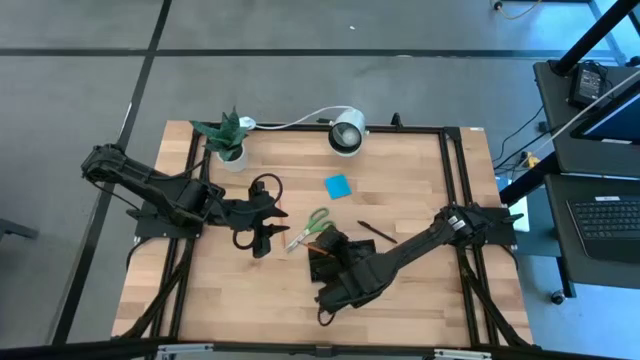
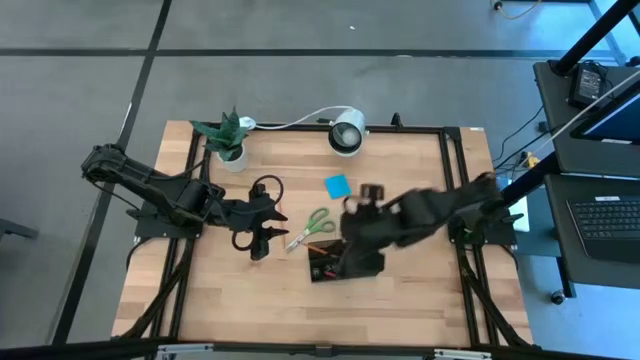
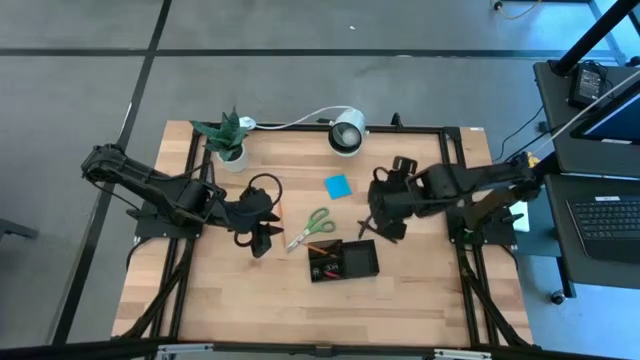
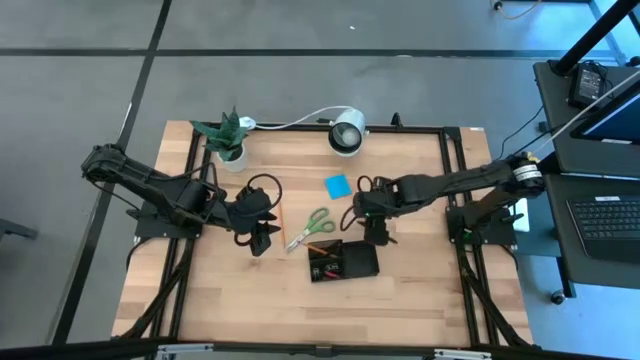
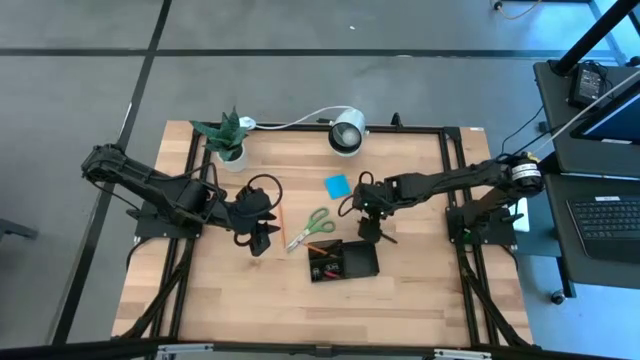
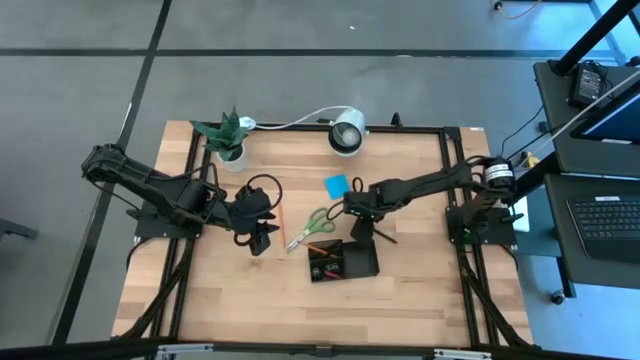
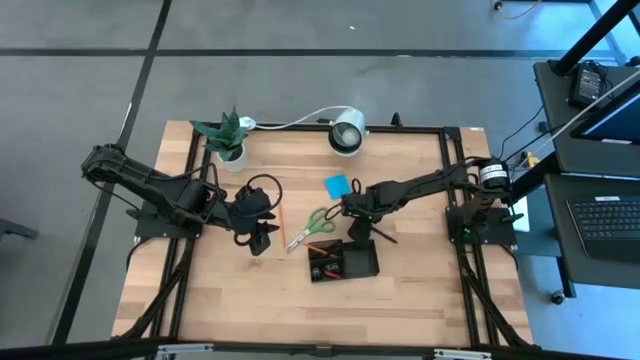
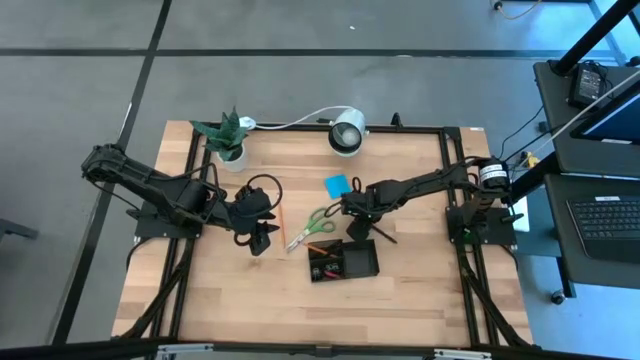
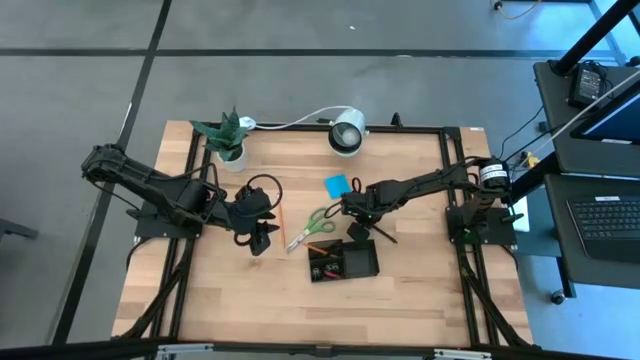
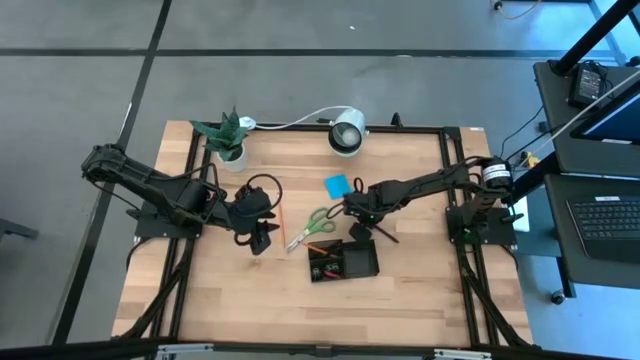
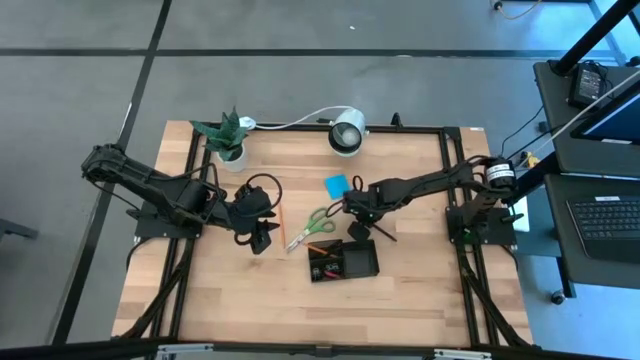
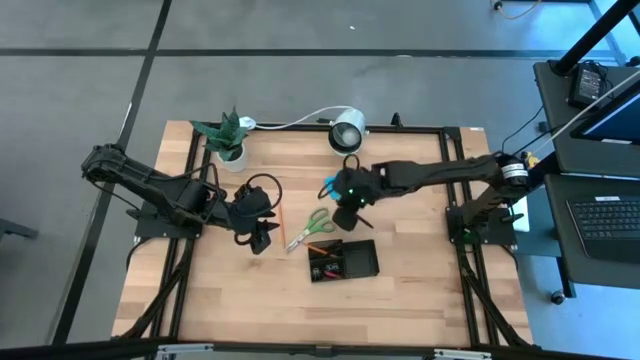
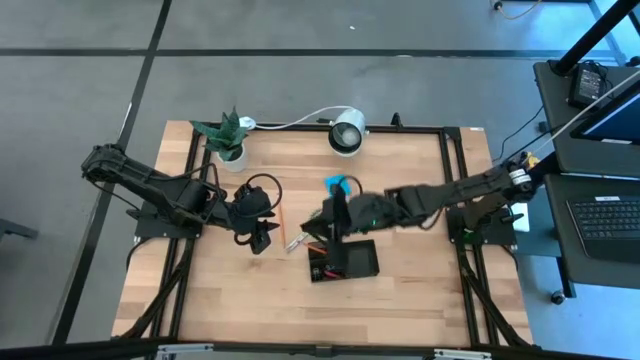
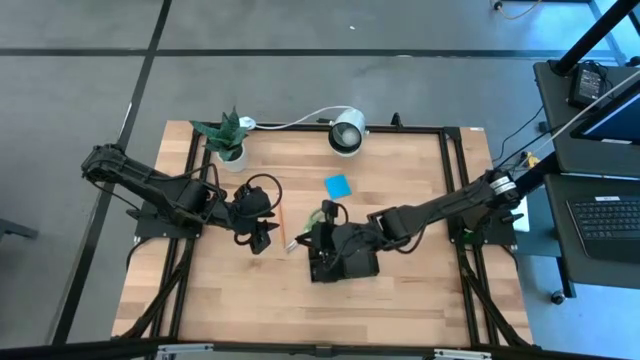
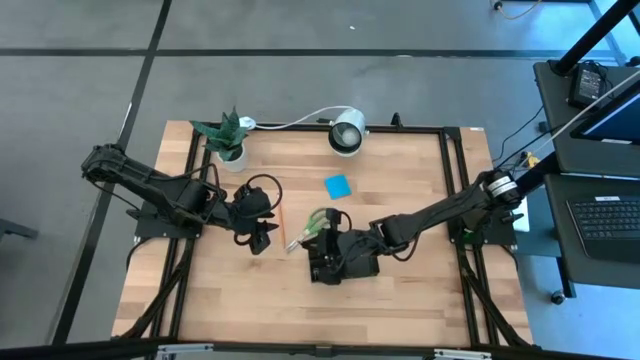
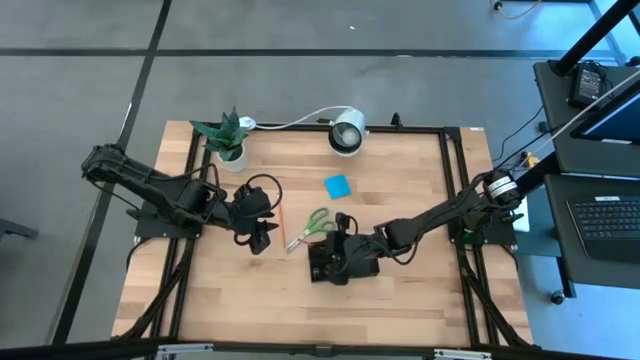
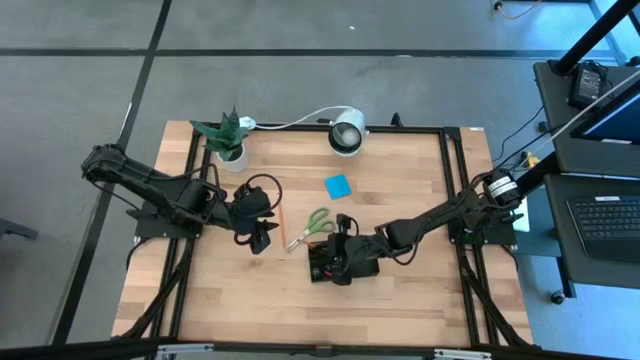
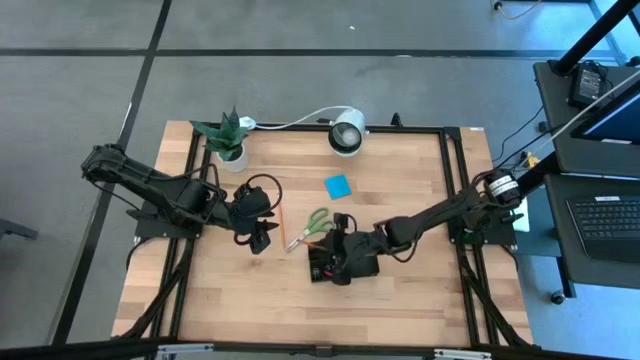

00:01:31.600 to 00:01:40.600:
Task: Pick and place office supplies into organizer
Put the black pen into the desk organizer

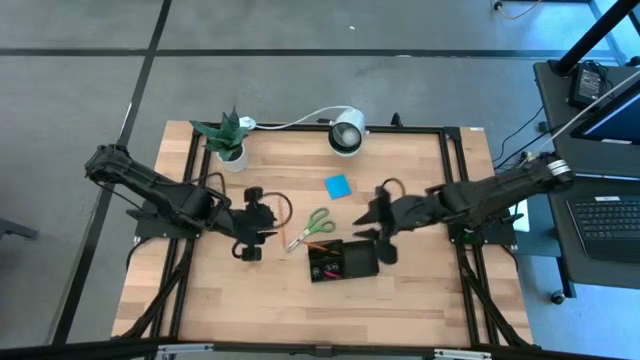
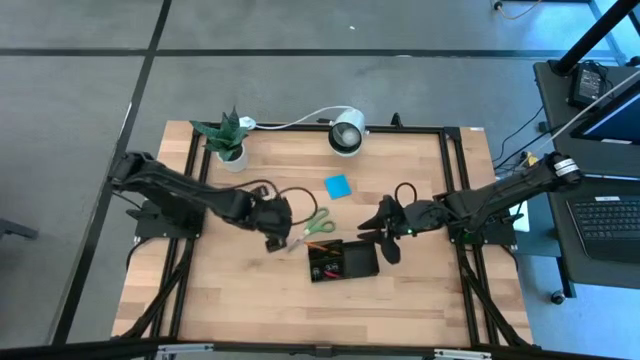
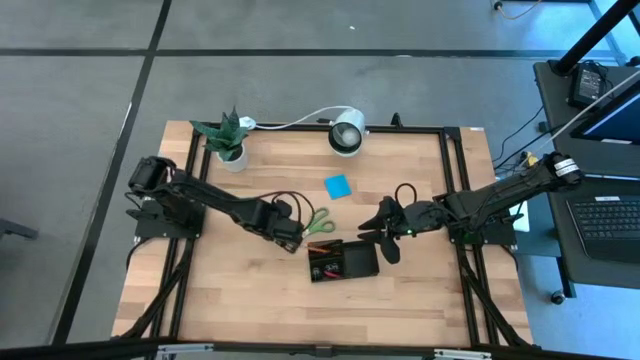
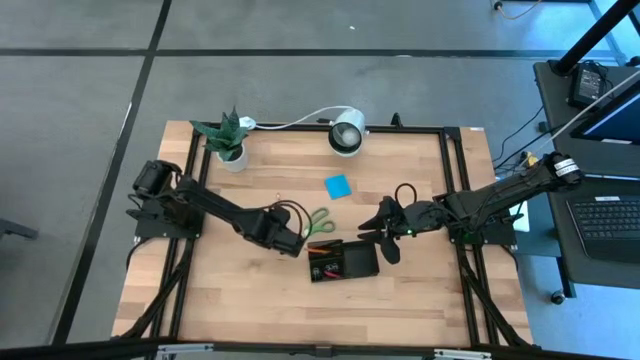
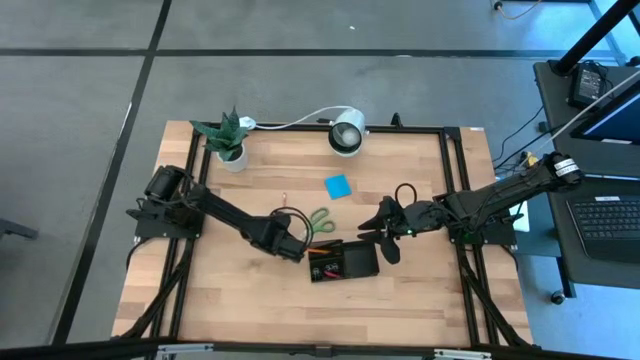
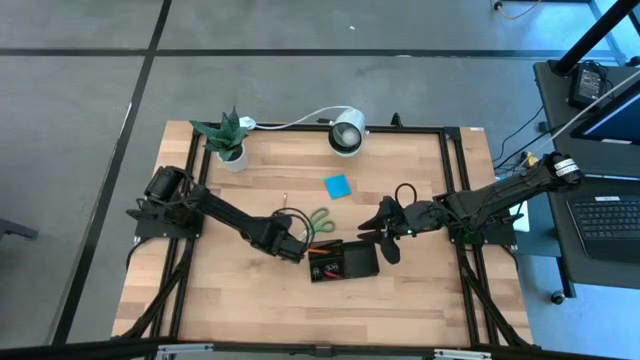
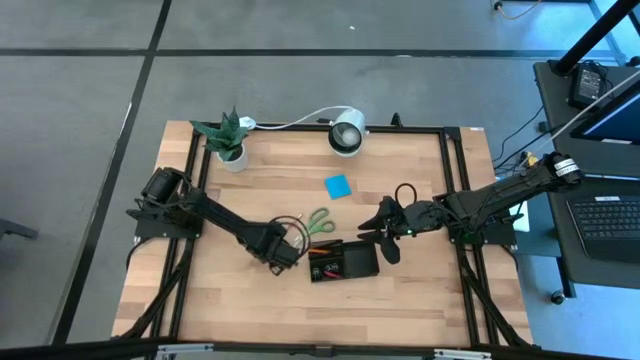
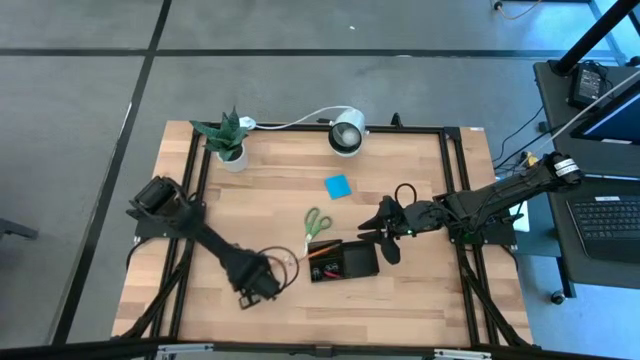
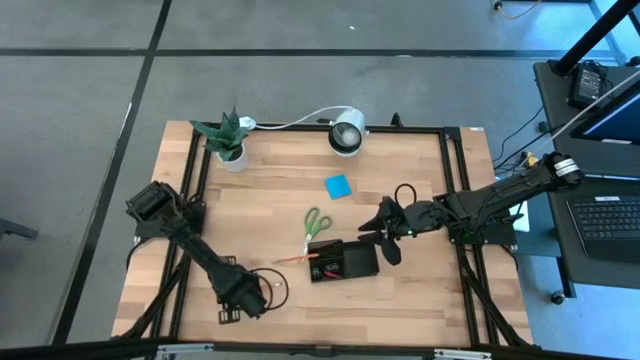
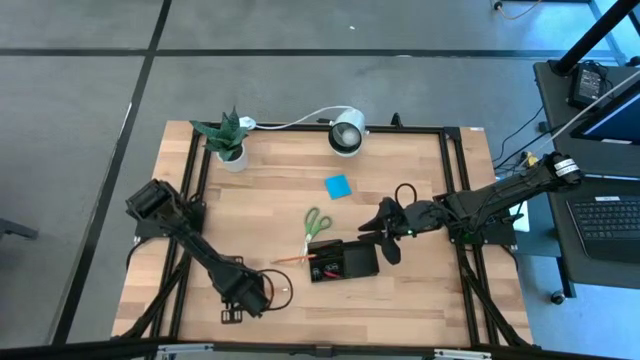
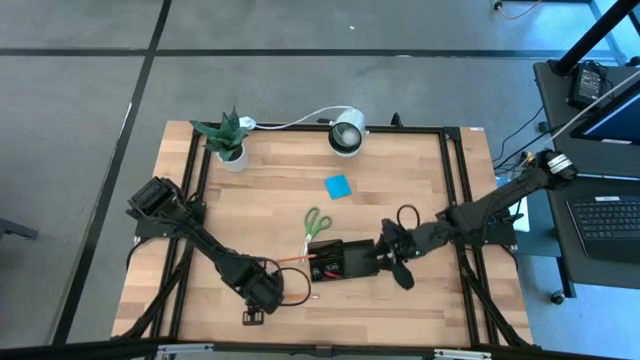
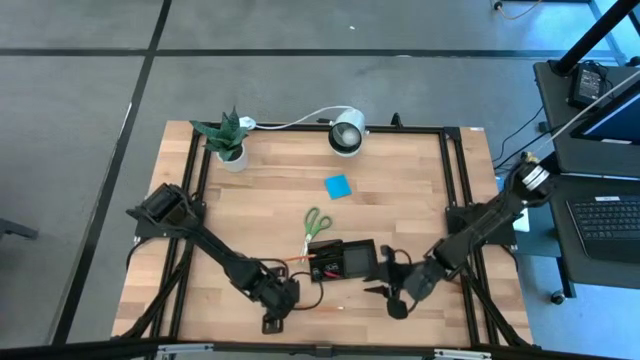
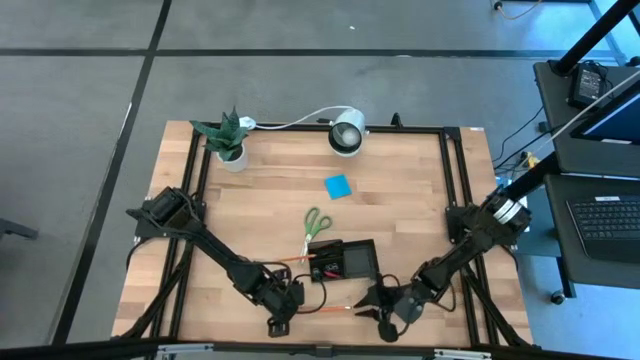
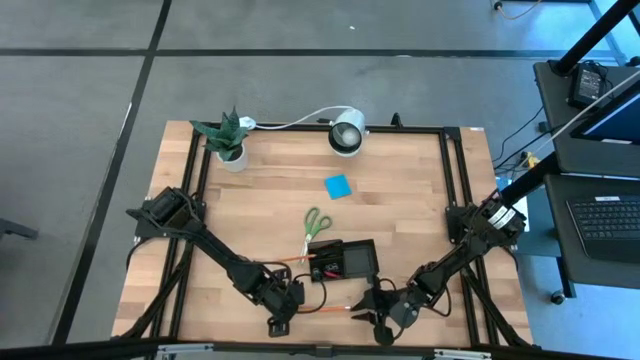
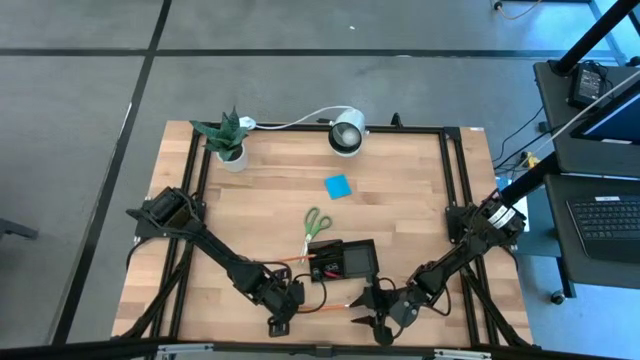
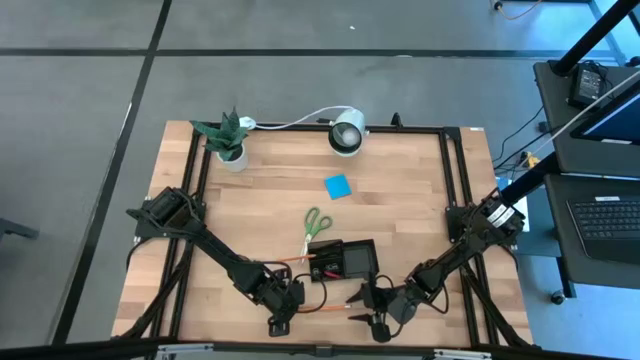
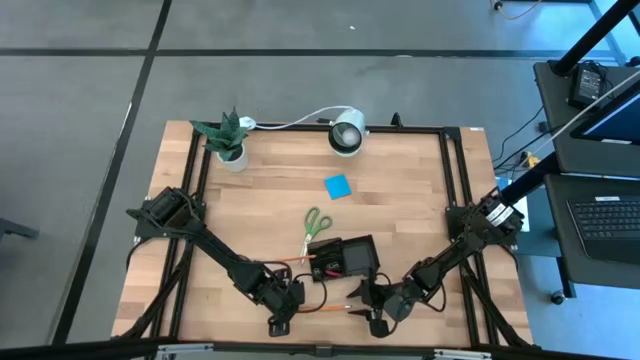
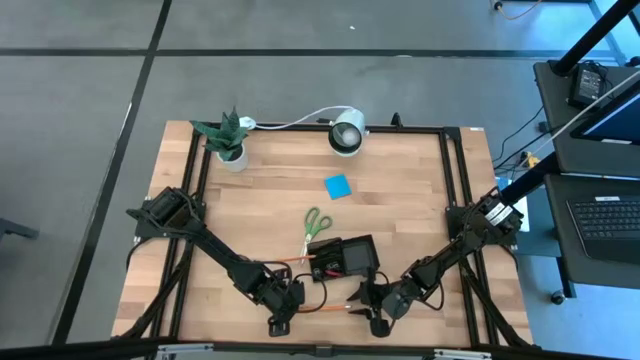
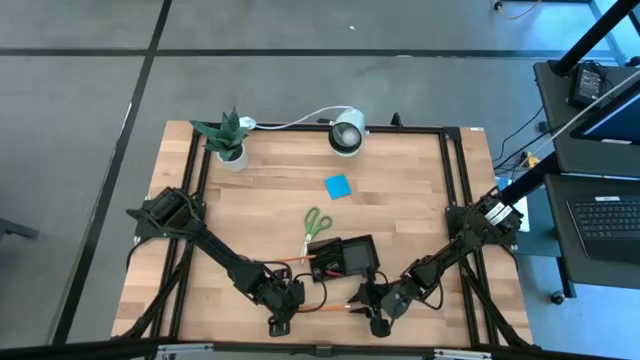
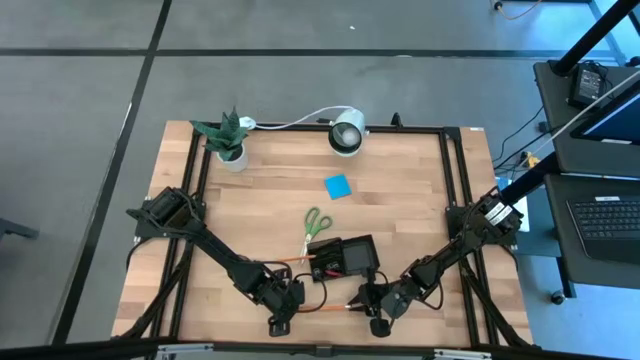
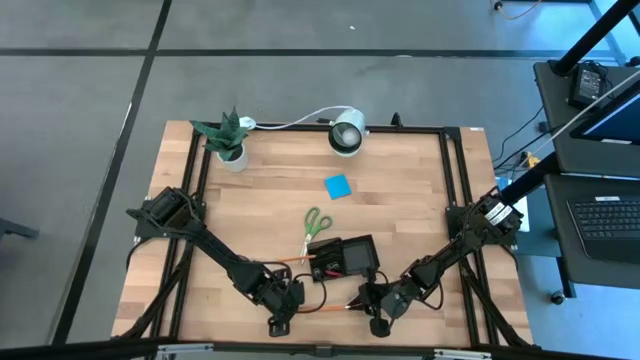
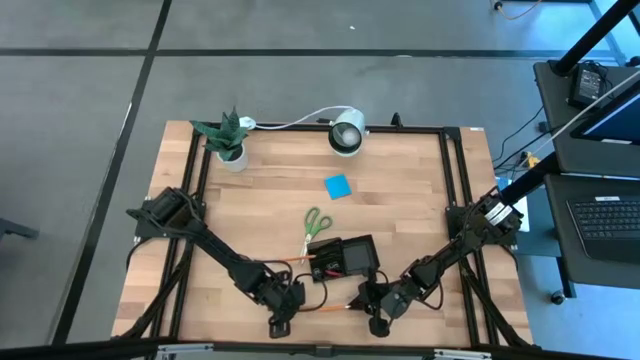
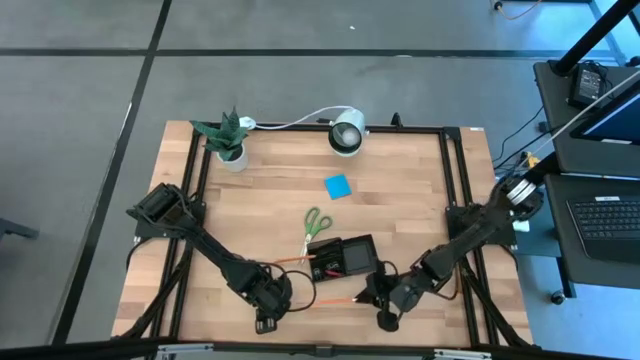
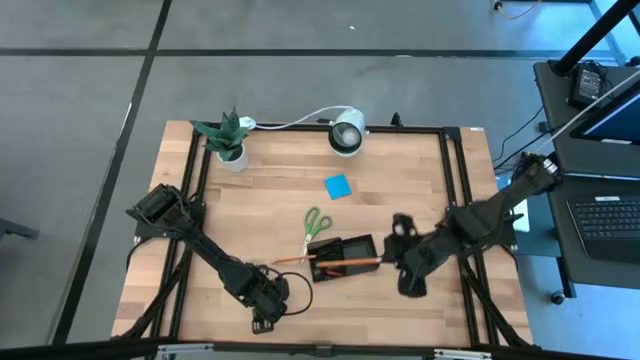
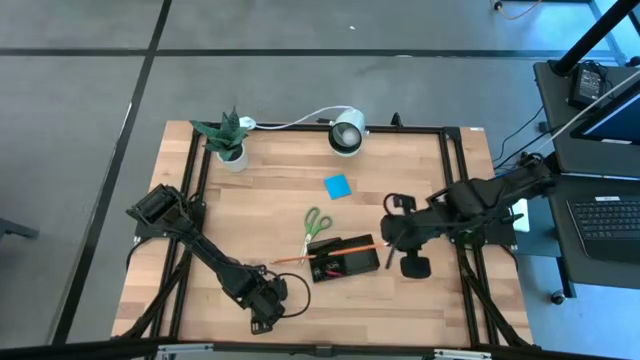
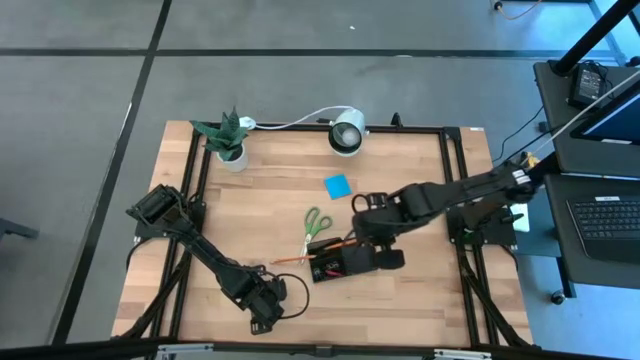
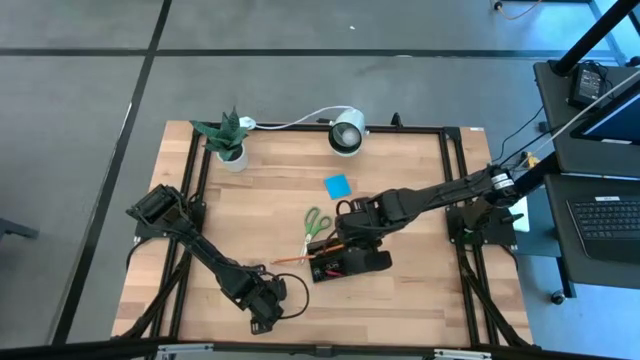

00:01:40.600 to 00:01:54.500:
Put the pencil into the desk organizer
